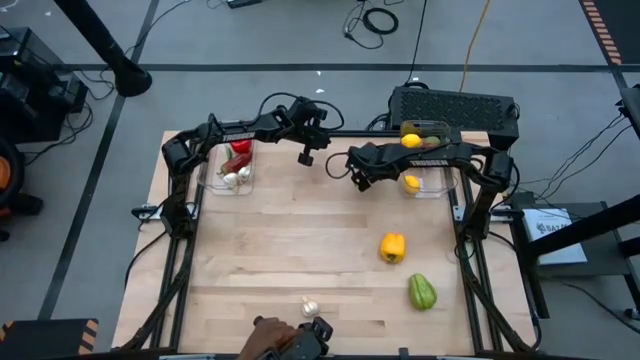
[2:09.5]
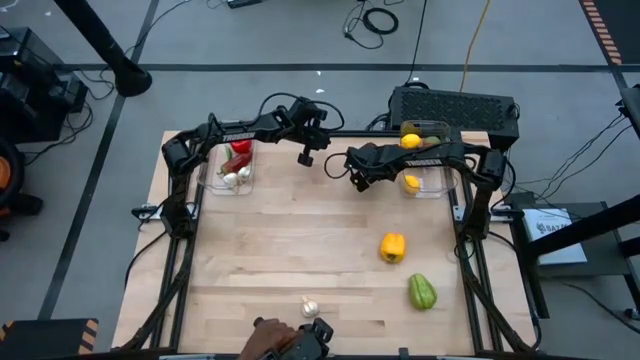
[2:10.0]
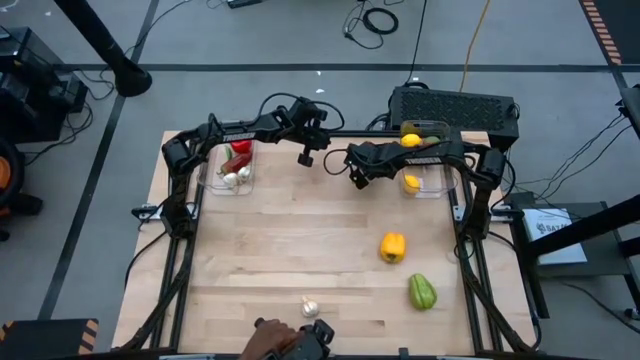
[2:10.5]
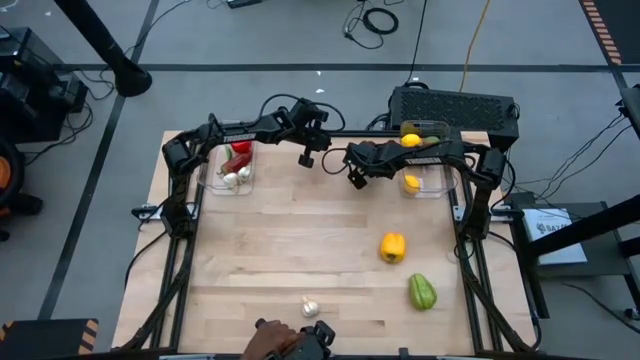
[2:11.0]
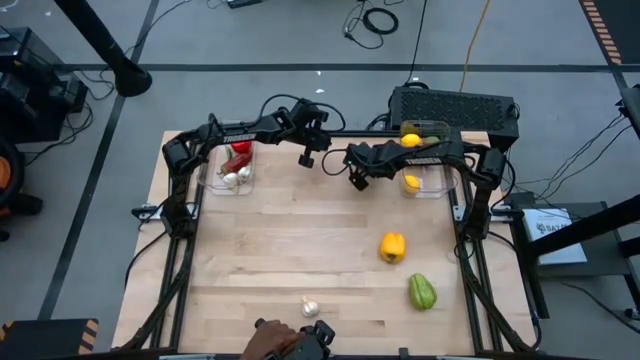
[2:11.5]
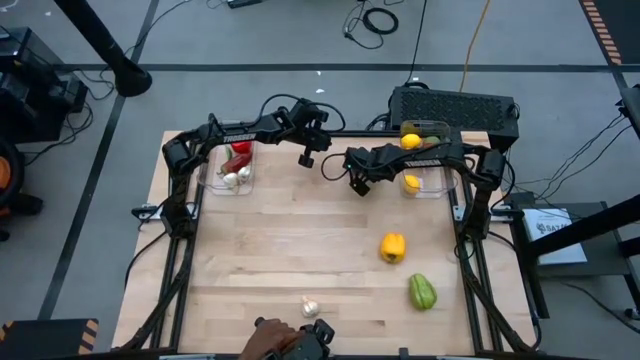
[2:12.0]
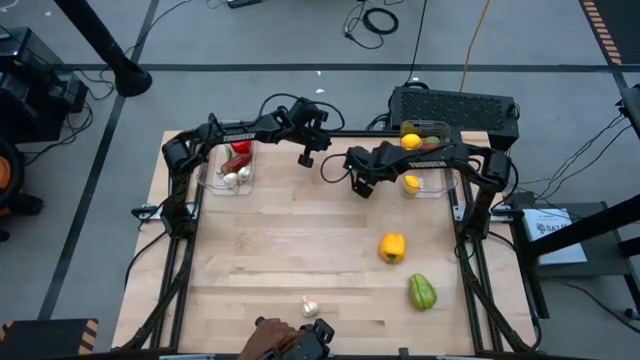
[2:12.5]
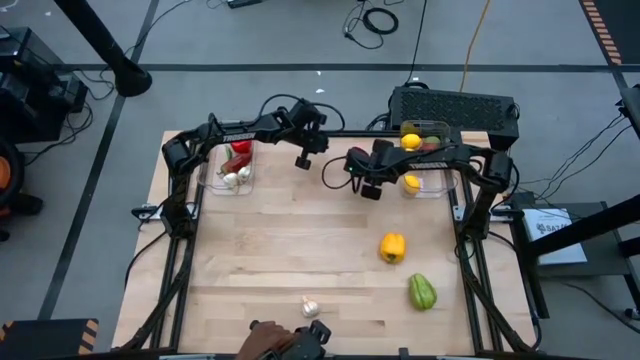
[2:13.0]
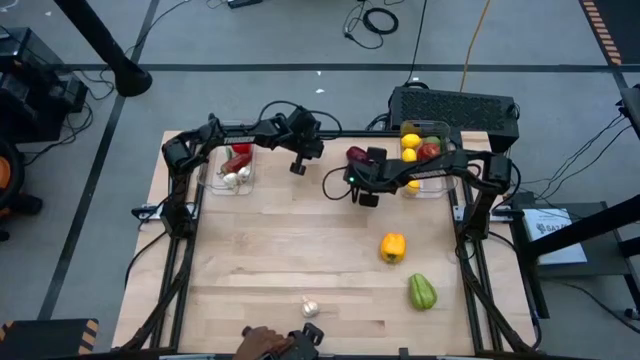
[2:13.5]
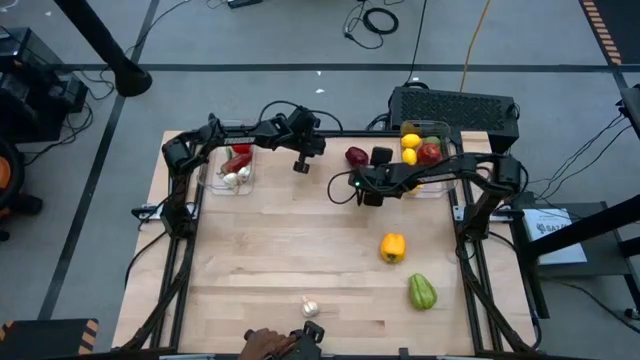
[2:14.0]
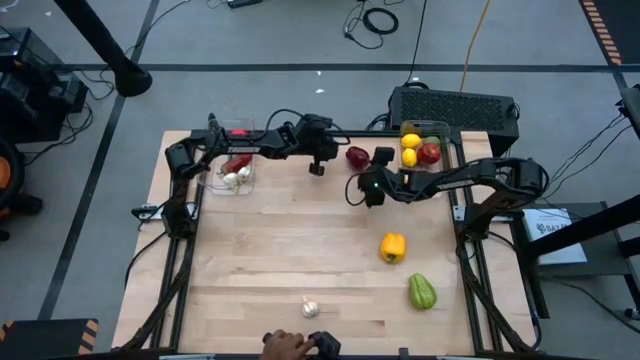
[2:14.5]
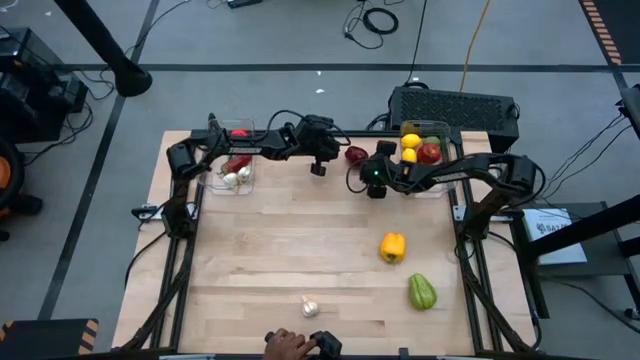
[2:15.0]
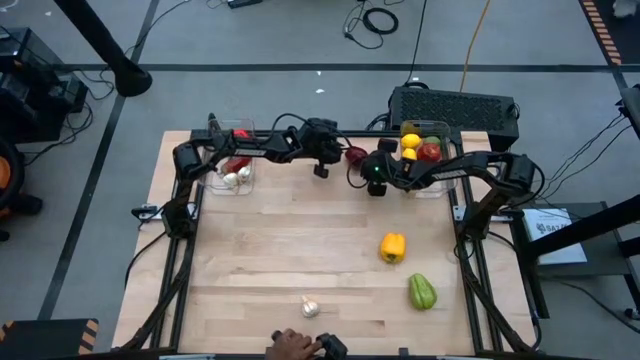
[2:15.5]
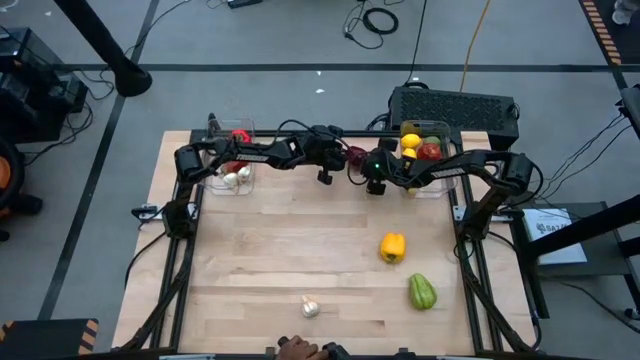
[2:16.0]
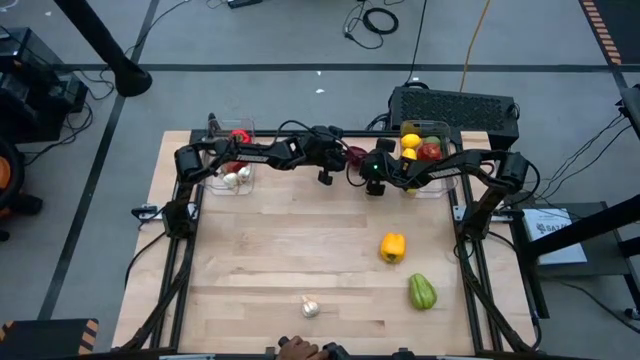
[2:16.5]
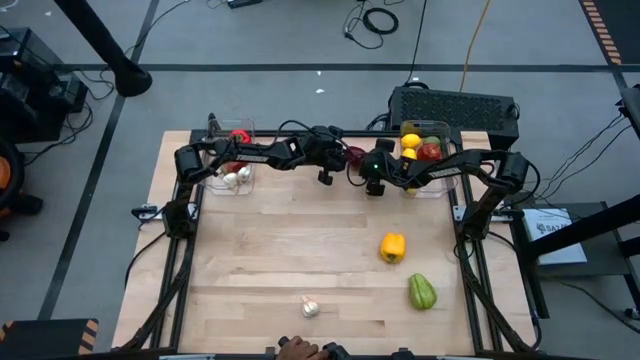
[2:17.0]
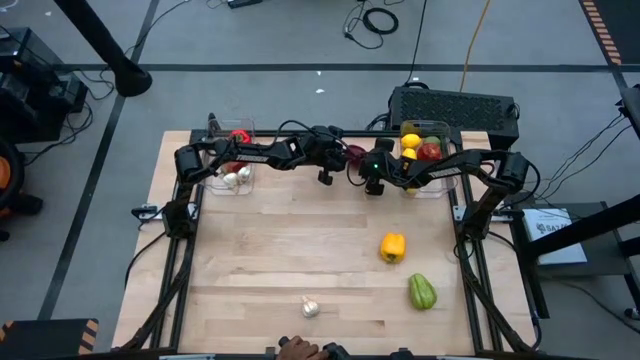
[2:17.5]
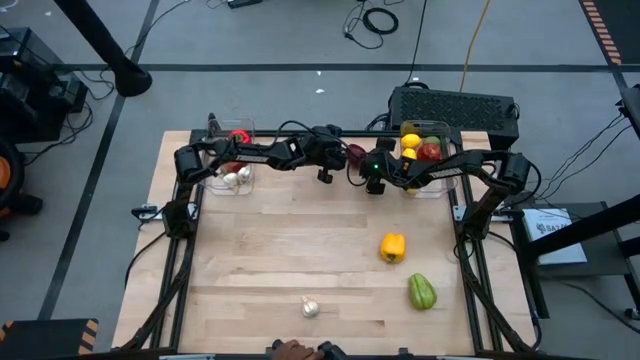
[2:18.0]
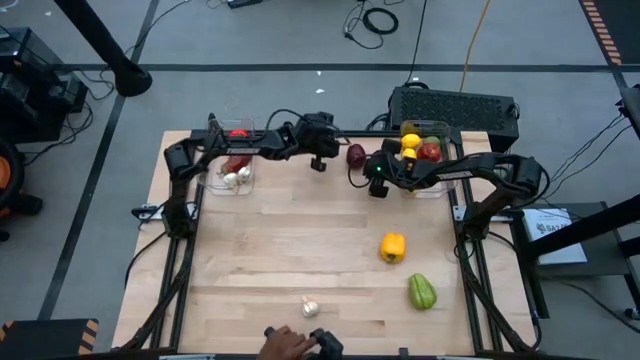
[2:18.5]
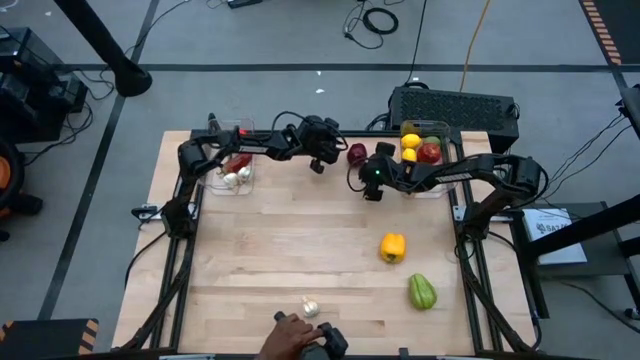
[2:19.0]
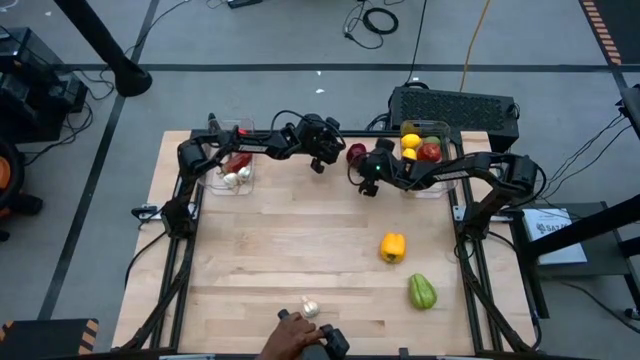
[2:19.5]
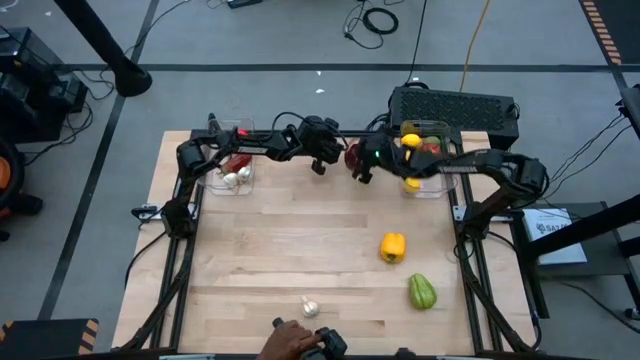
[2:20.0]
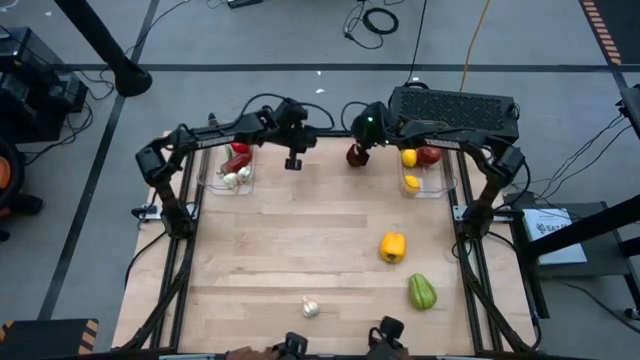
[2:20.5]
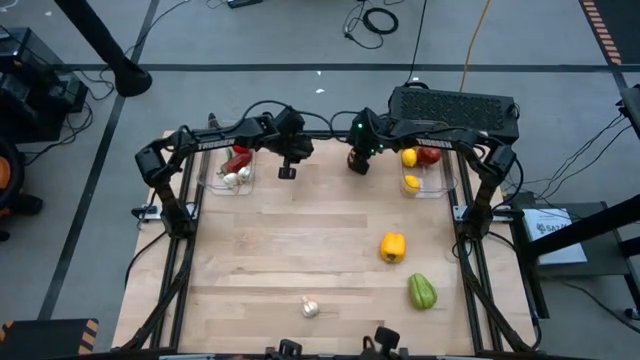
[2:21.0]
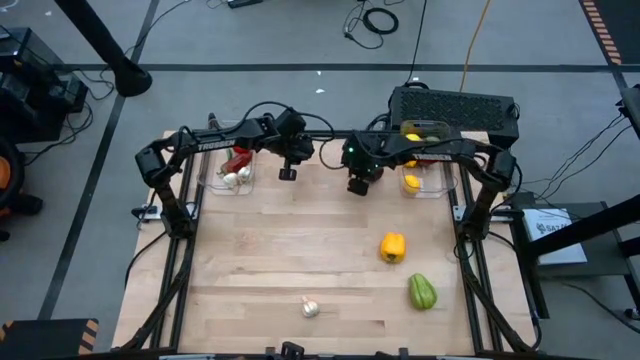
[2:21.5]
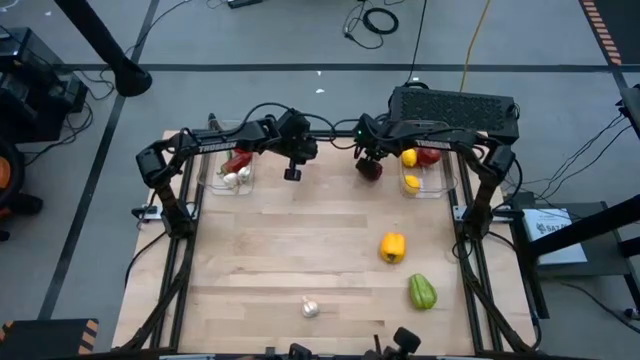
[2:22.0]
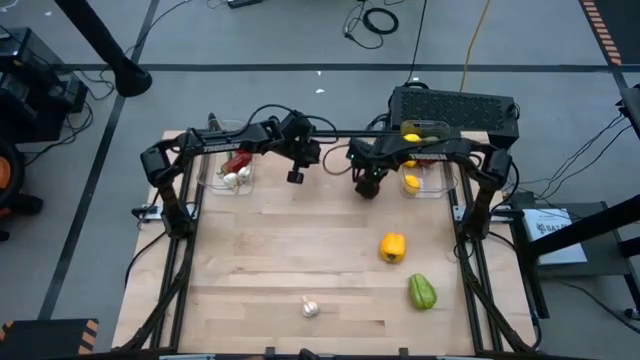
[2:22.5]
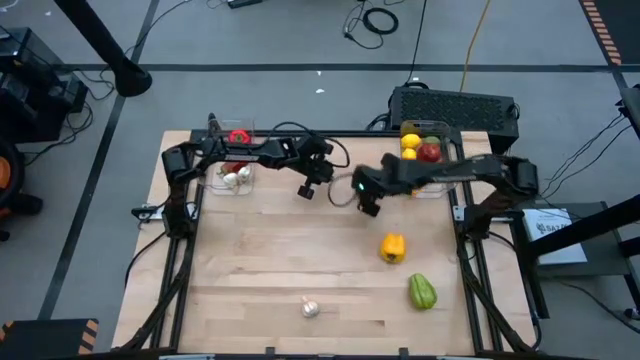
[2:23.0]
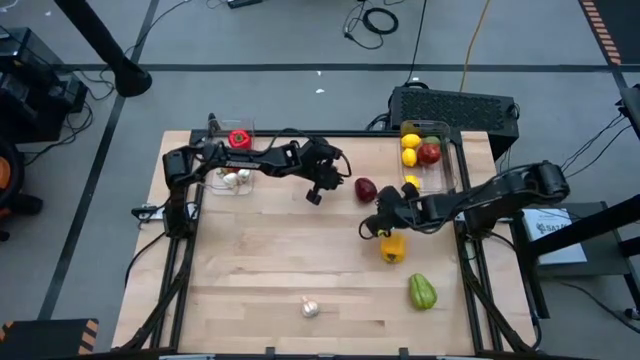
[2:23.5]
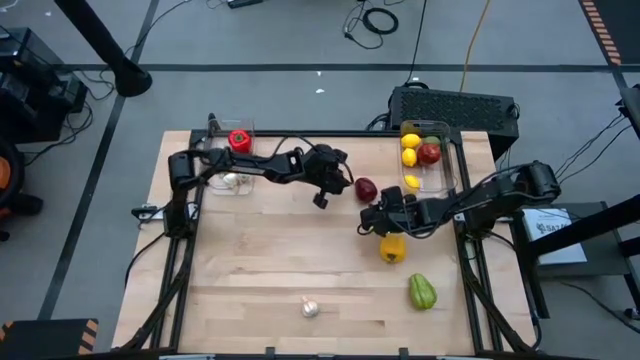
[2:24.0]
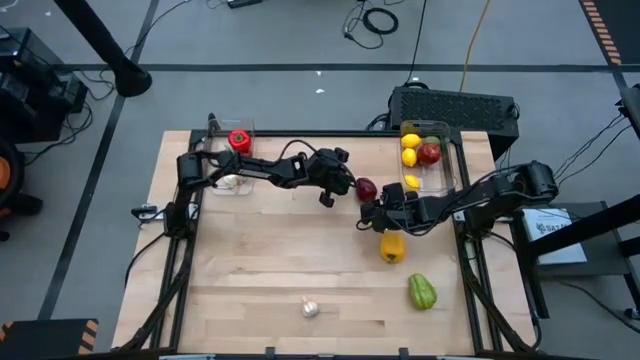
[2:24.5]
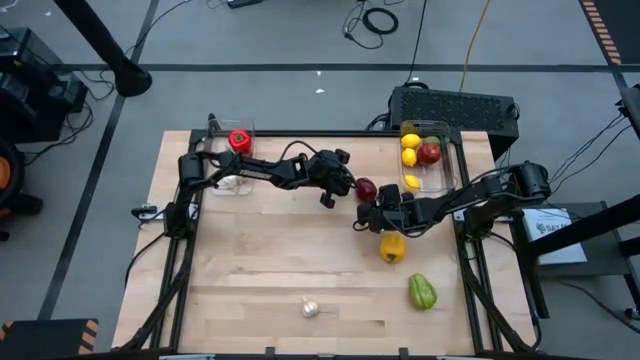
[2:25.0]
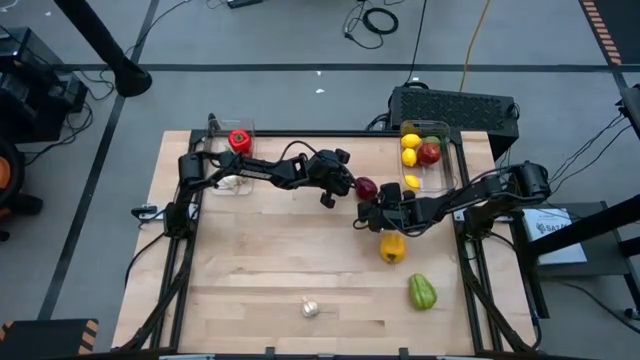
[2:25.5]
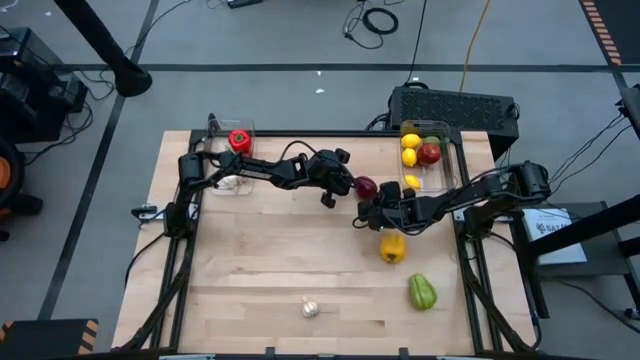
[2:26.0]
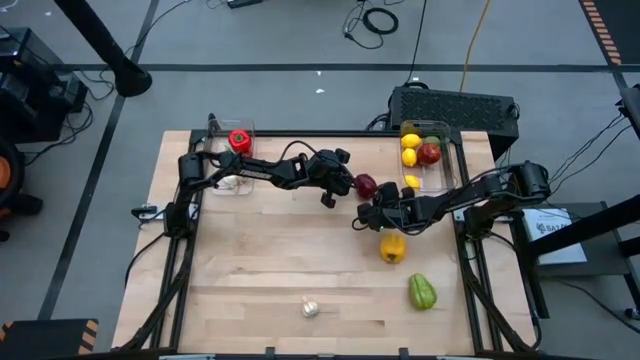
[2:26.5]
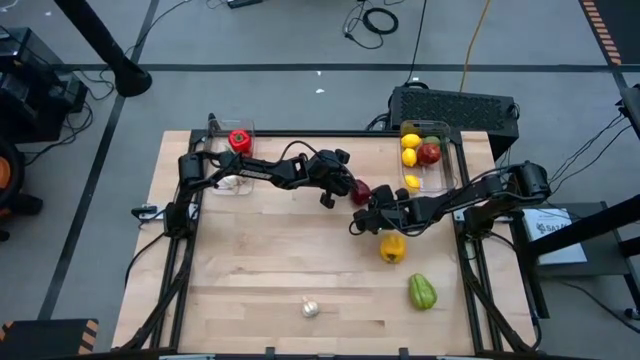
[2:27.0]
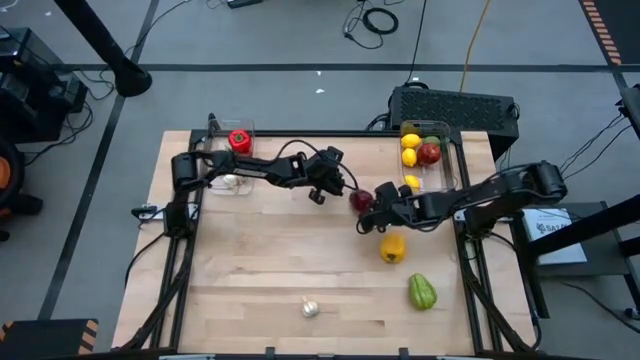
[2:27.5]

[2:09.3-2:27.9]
Task: Sort produce into baskets
Put the apple into the right transparent bin

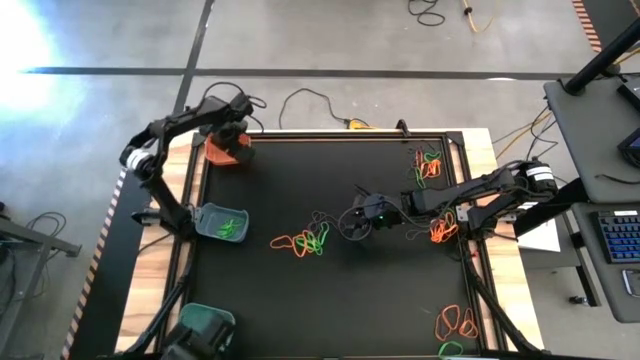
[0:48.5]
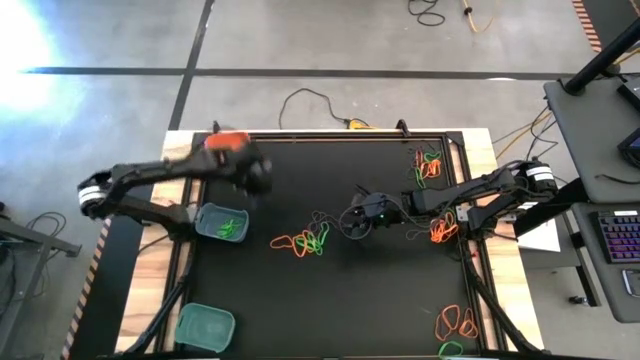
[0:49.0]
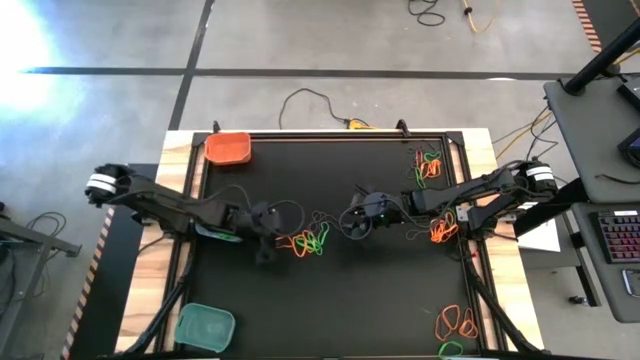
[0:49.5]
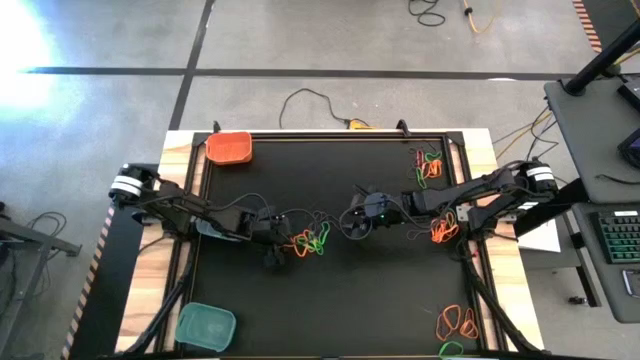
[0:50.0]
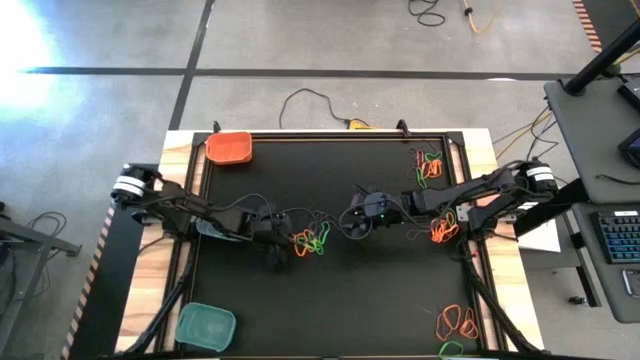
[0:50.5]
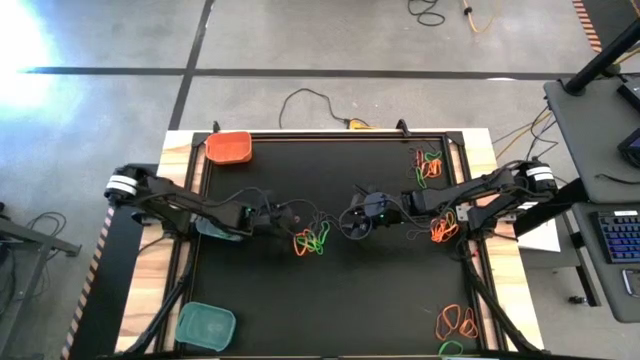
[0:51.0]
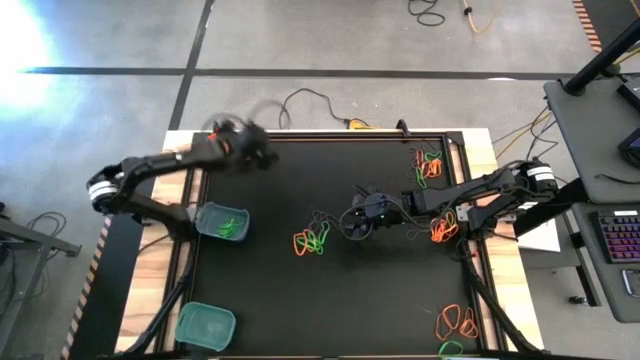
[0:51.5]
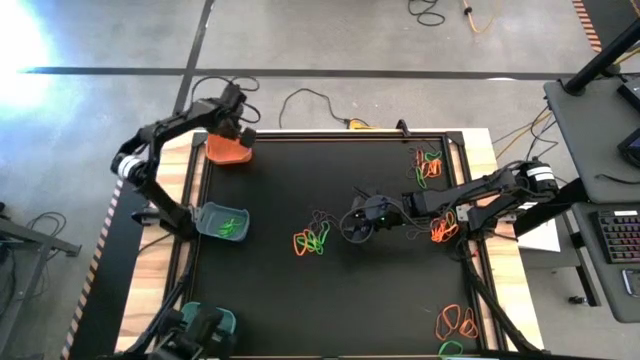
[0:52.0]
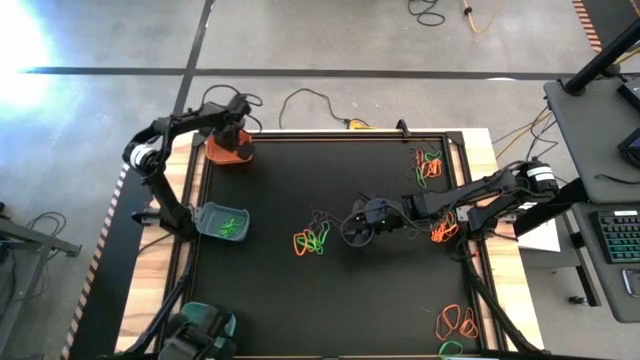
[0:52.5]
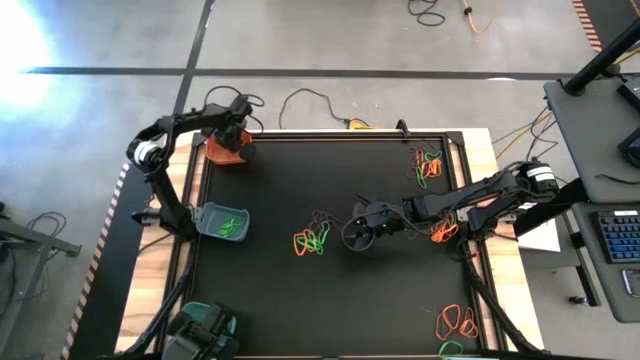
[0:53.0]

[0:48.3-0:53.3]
Task: Sort rubber bands into baskets
Put the orange rubber band into the orange bin
